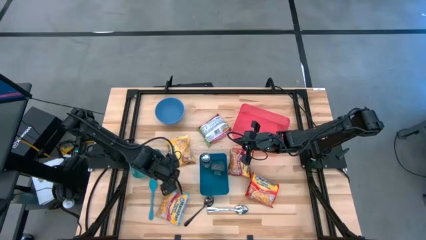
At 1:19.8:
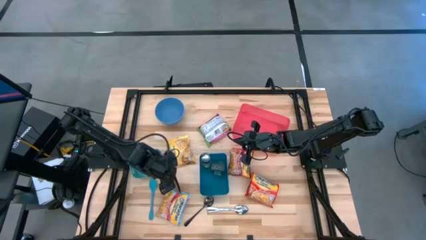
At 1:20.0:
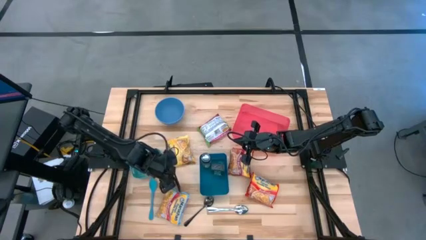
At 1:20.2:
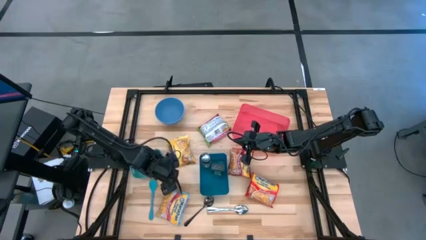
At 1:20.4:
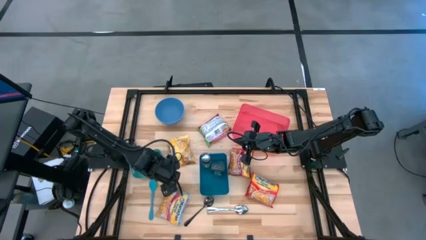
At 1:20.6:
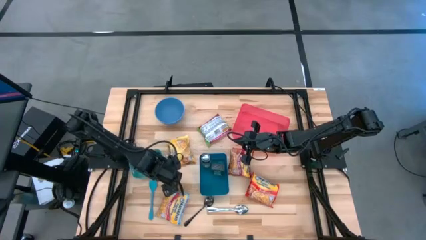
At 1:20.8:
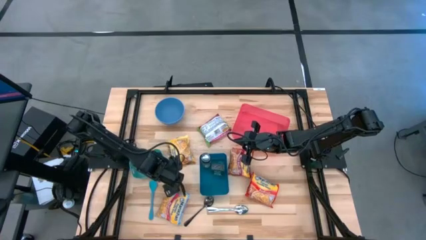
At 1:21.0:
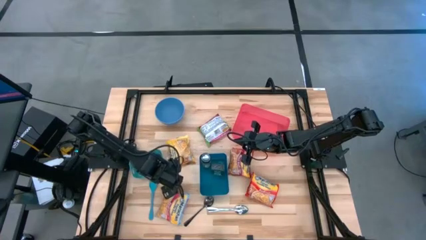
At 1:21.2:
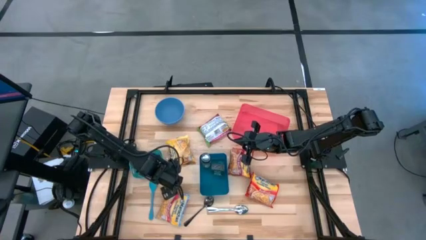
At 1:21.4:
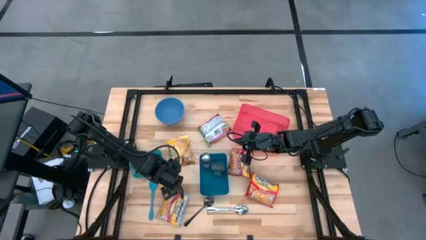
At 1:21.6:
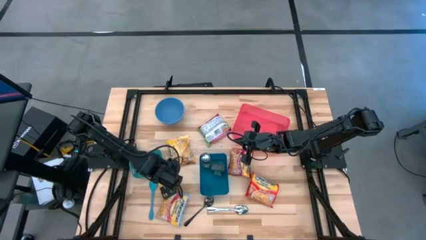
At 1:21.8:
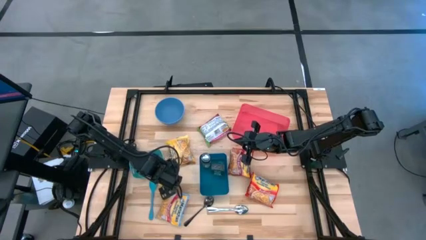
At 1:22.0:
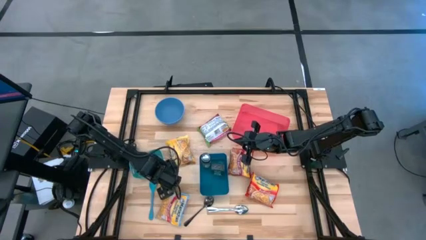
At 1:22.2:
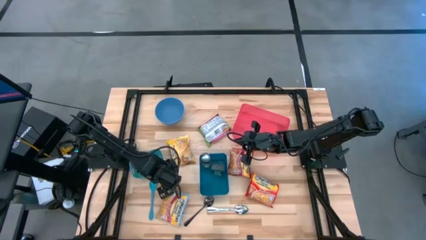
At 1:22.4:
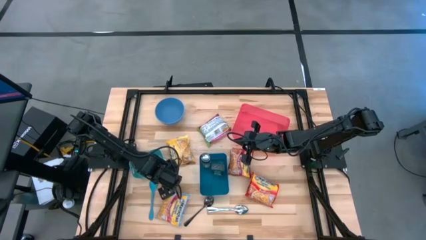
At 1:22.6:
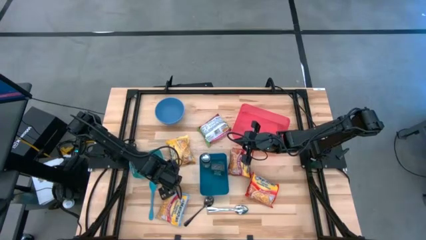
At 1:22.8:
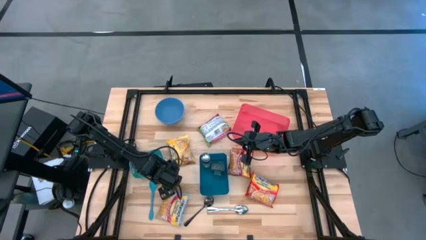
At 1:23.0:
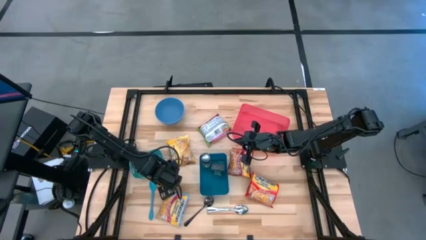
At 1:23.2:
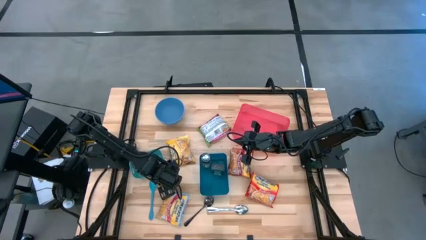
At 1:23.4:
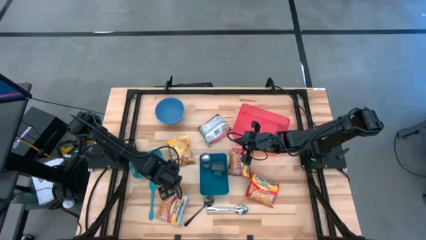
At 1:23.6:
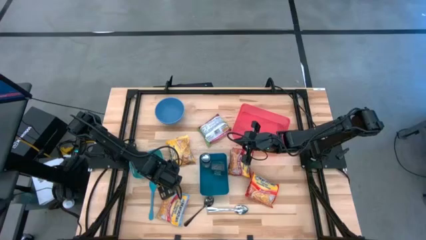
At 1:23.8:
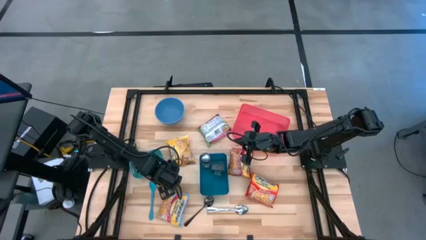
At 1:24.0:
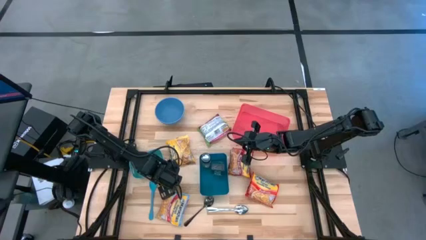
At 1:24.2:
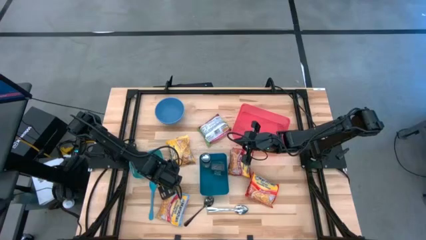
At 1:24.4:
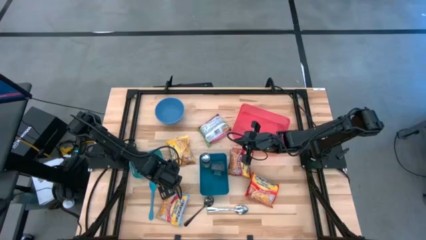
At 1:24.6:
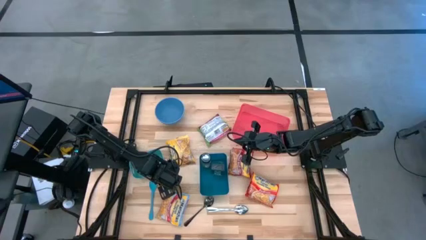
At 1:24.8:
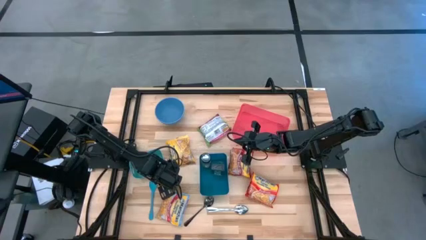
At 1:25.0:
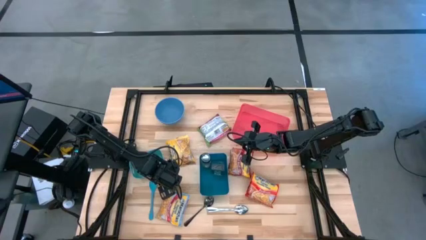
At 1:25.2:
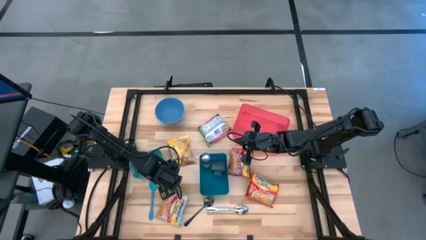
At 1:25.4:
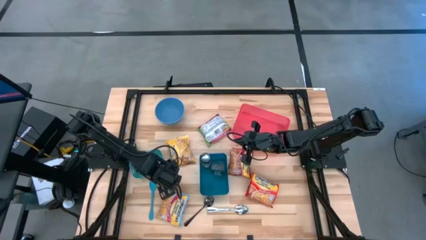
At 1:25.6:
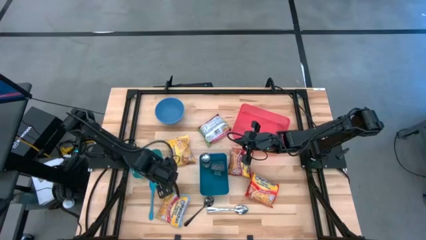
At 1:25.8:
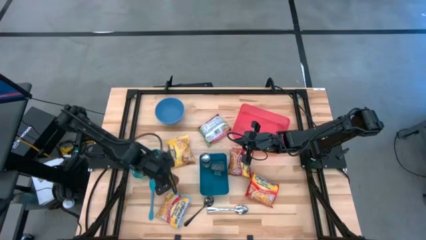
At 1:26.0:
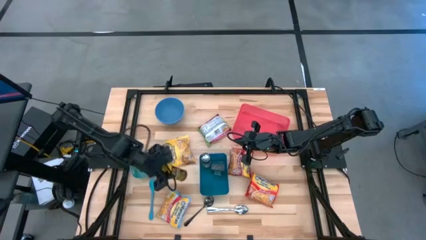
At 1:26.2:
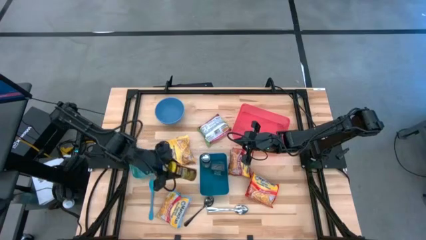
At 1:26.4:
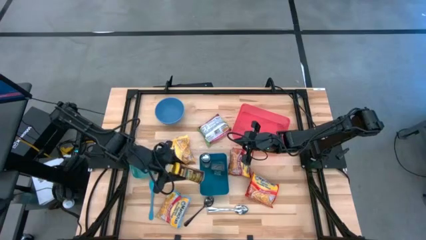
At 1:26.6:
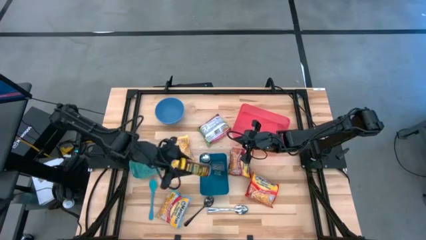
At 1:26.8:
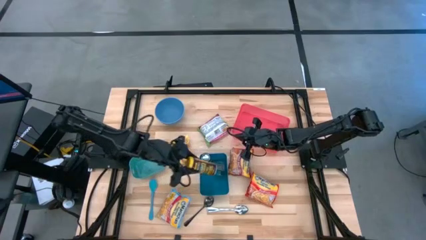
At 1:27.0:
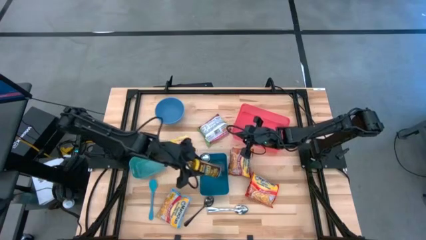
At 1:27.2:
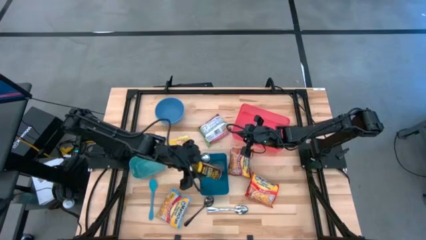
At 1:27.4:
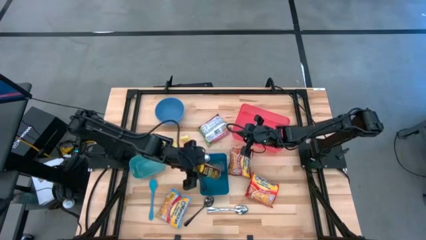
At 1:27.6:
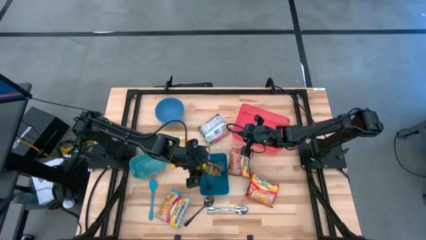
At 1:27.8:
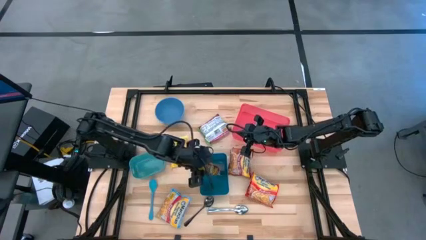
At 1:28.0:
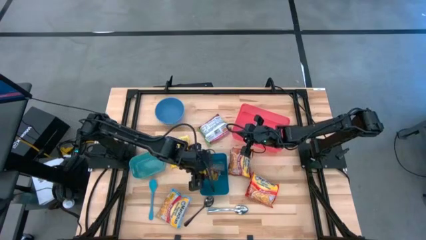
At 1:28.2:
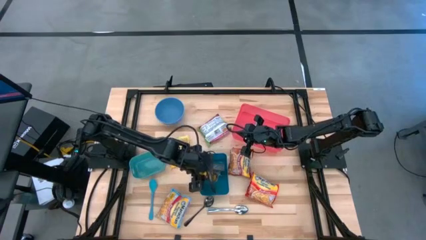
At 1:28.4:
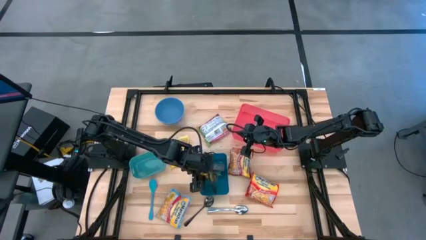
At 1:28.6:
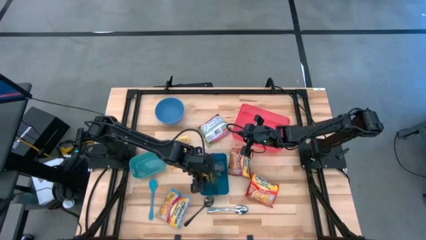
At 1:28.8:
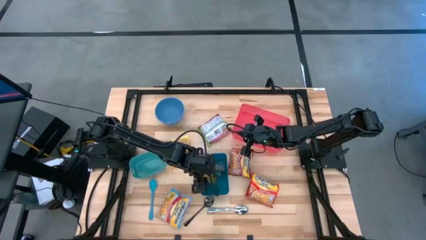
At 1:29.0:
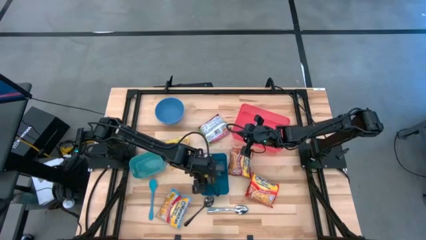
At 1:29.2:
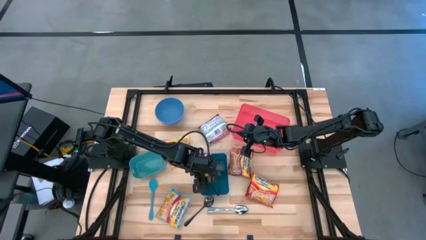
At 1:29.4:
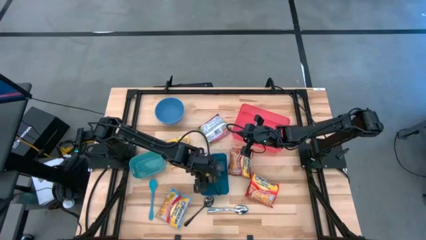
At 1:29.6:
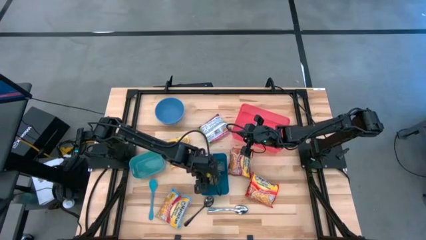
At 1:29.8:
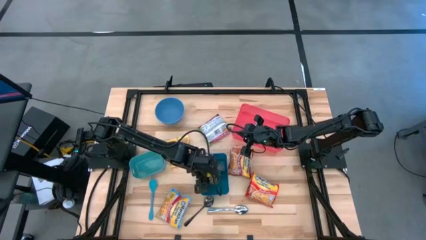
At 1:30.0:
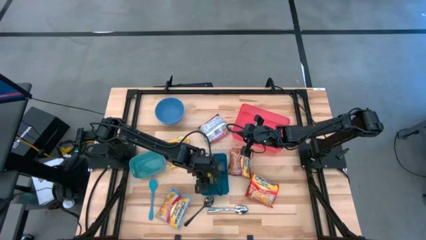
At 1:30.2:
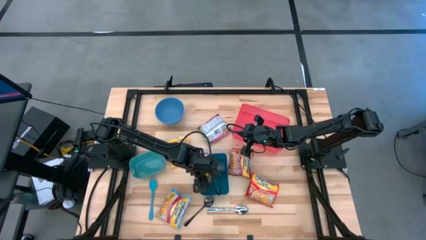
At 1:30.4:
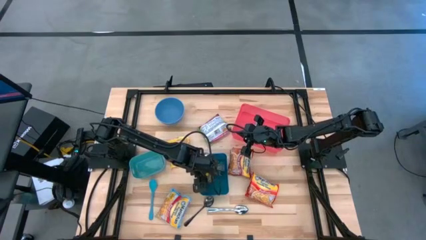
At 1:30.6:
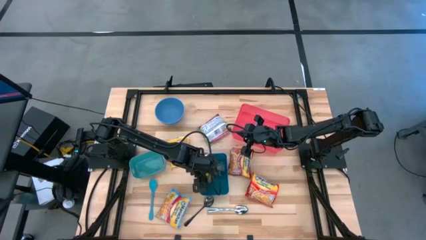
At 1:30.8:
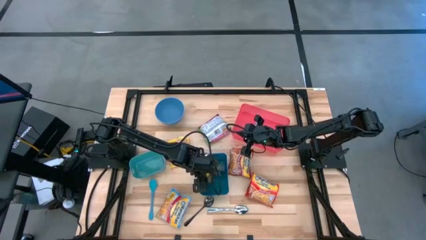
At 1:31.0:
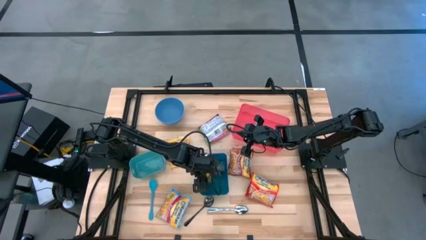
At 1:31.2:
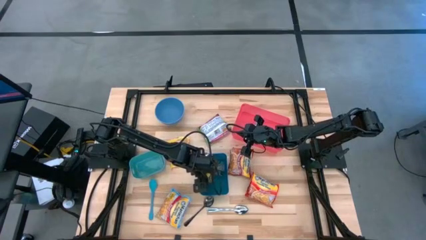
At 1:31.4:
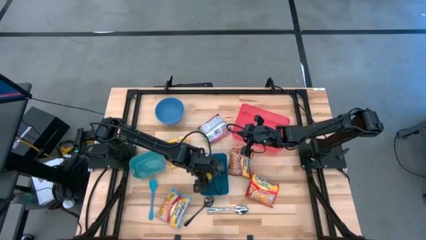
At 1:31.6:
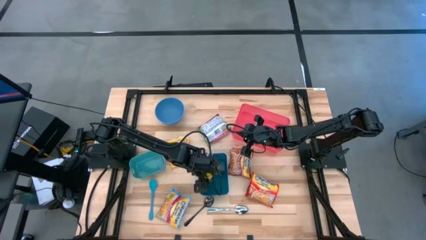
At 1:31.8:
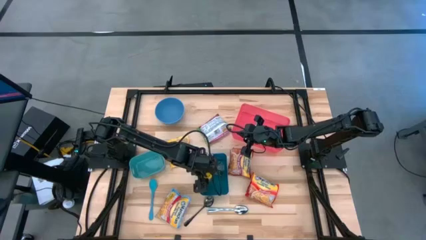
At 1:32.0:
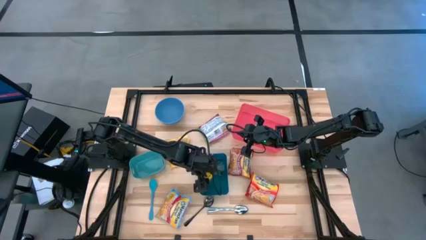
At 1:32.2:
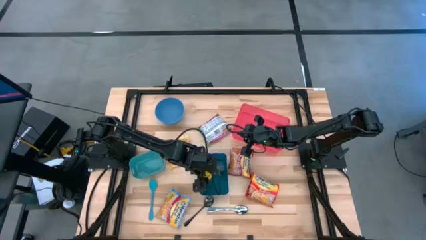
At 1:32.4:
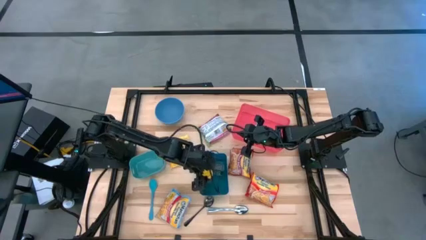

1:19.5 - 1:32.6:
Task: Pick & Place Food Item
Put the yellow seasoning bottle into the blue bin

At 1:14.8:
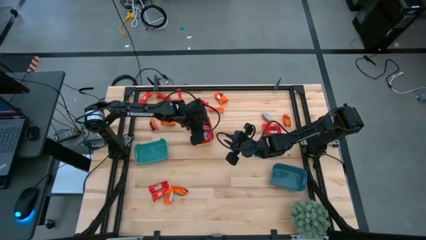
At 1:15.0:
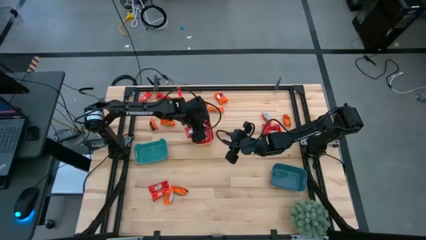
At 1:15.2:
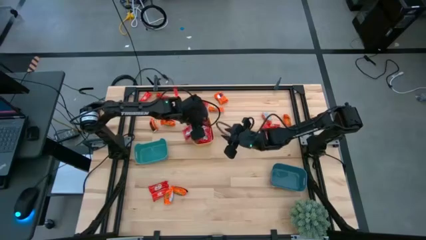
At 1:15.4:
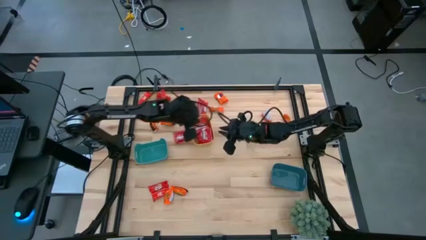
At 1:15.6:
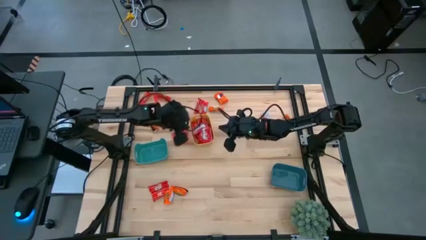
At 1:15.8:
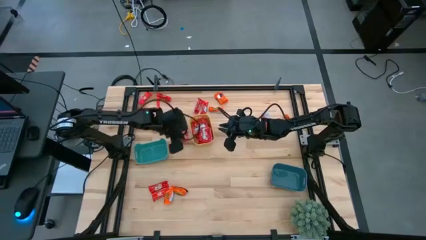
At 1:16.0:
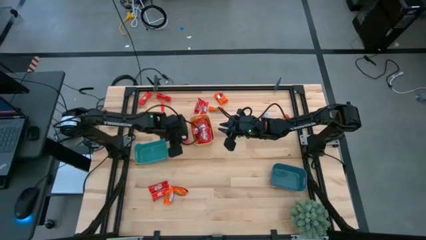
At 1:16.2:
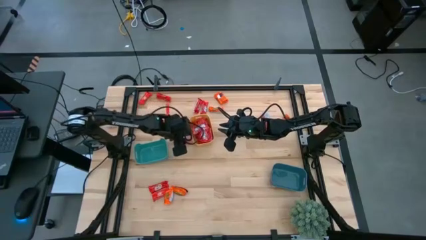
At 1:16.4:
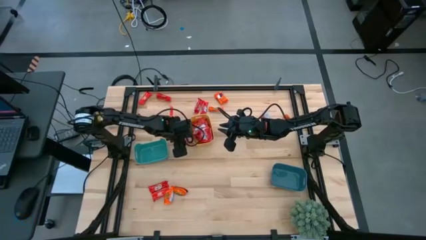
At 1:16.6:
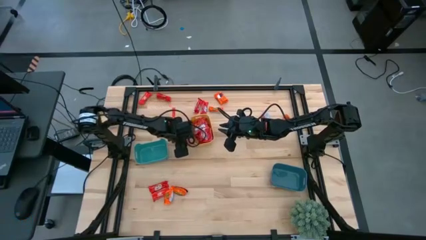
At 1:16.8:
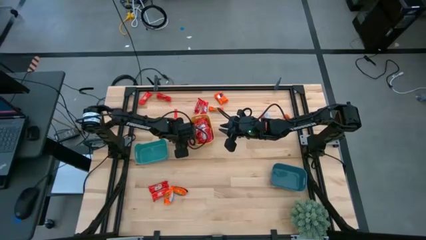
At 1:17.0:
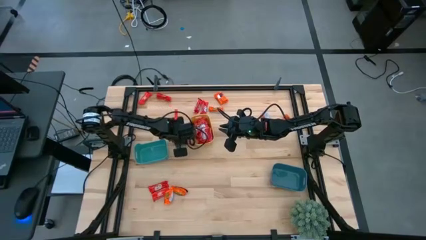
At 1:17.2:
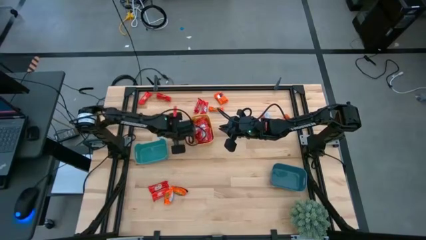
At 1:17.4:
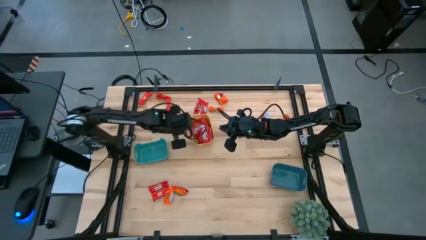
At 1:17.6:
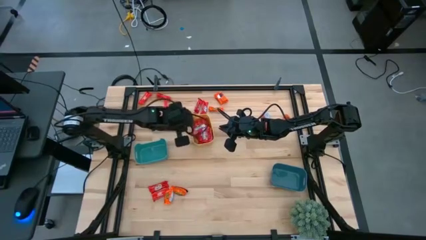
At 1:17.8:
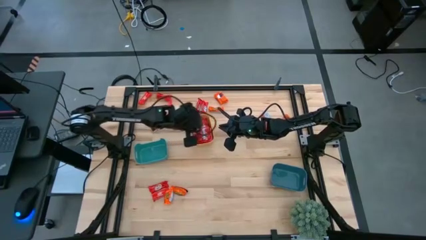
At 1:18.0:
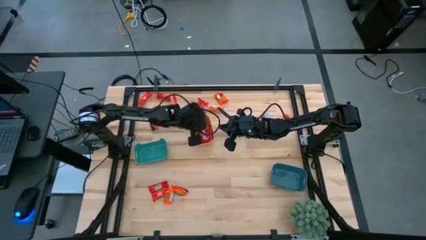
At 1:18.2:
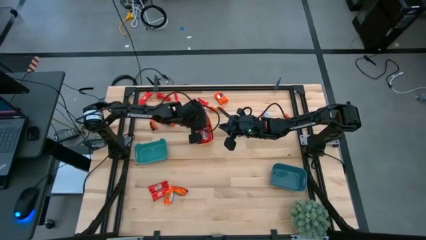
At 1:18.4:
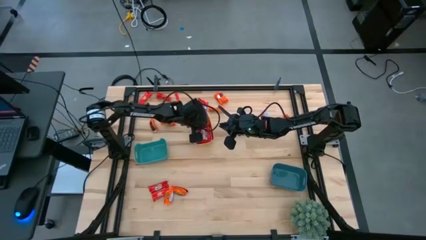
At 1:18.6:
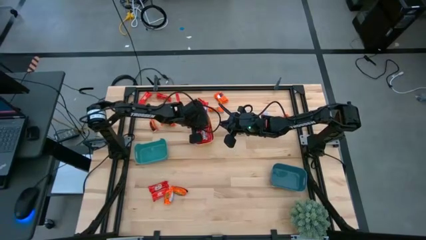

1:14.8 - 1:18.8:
Task: Sort candy
Put the red candy into the yellow bin
